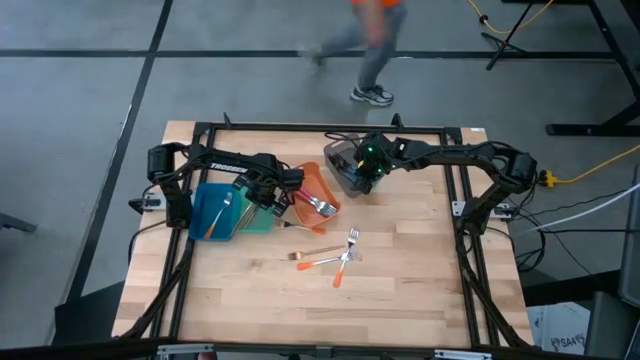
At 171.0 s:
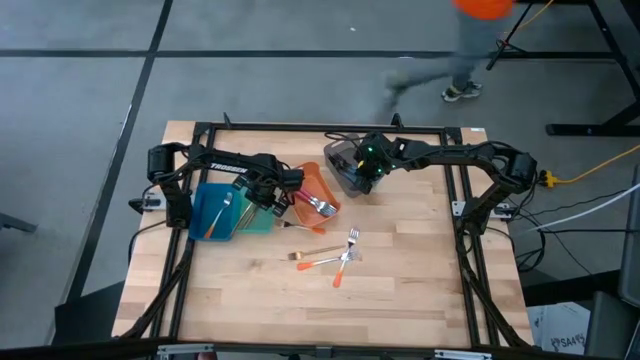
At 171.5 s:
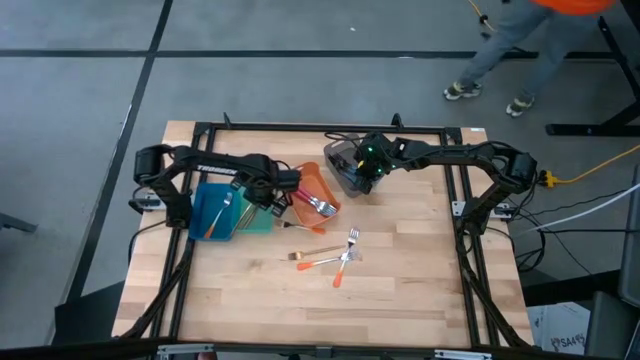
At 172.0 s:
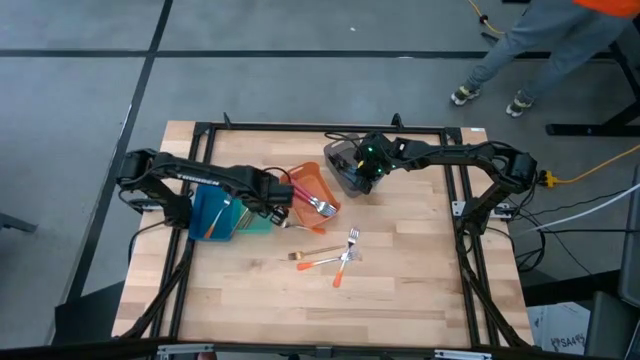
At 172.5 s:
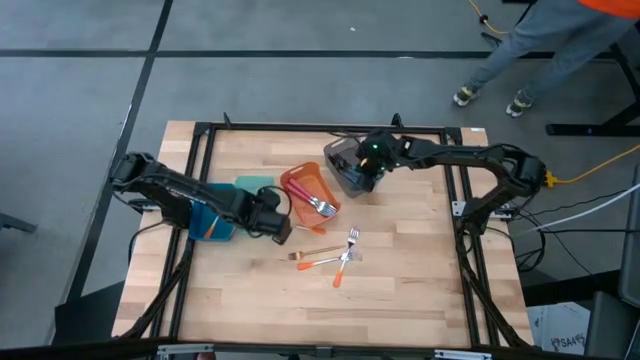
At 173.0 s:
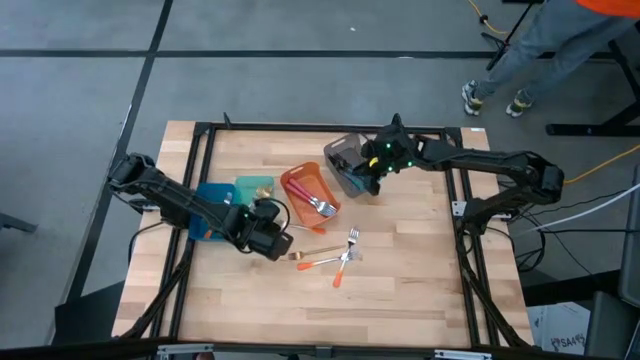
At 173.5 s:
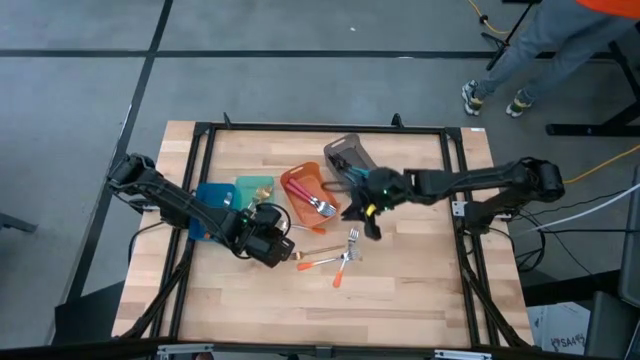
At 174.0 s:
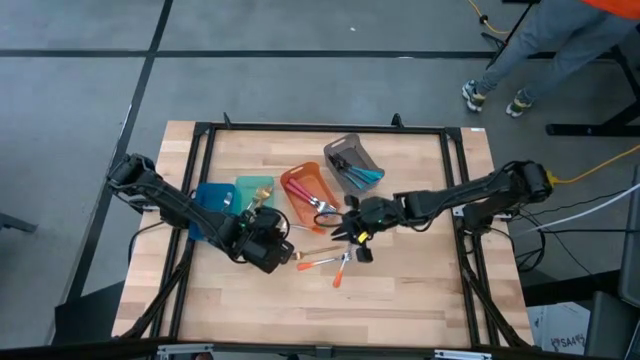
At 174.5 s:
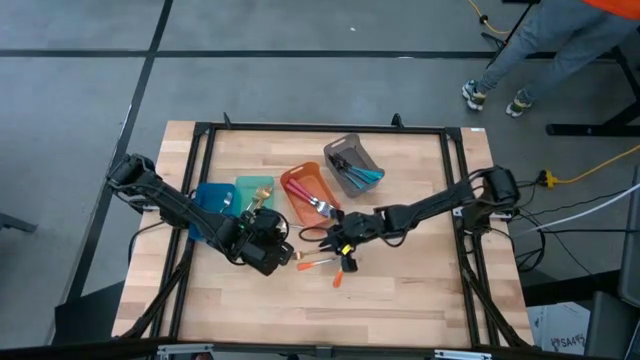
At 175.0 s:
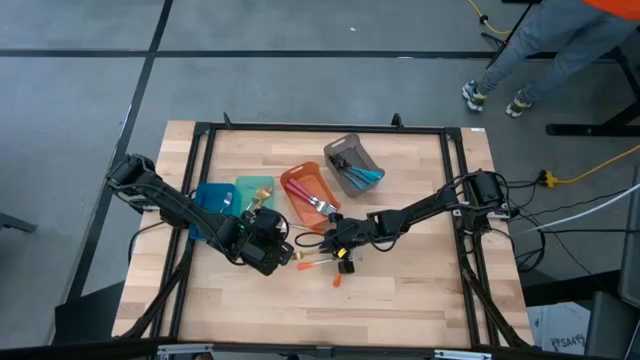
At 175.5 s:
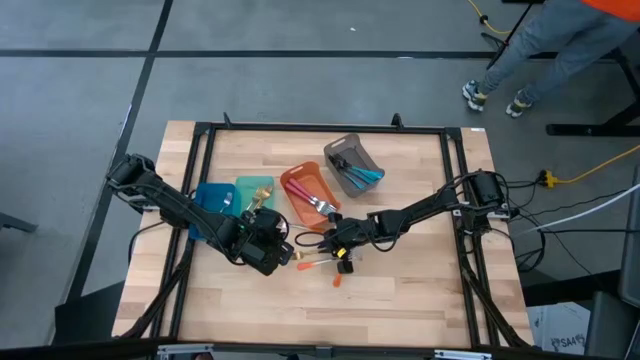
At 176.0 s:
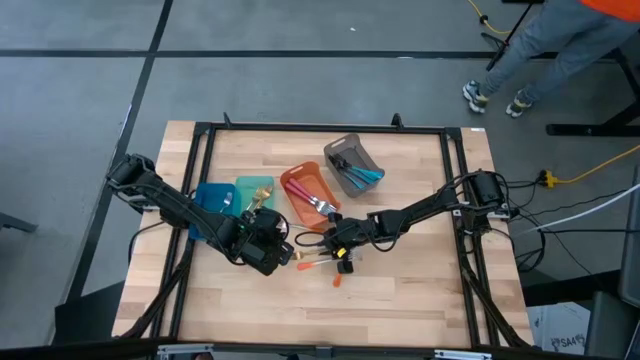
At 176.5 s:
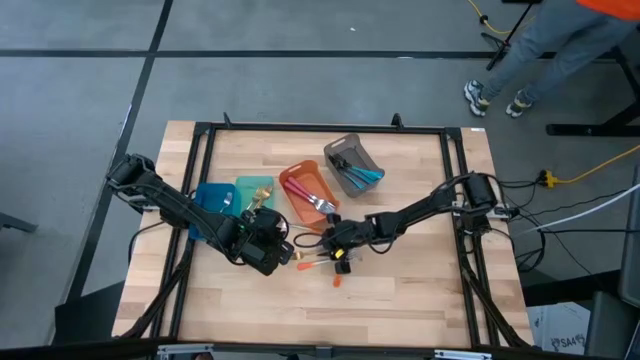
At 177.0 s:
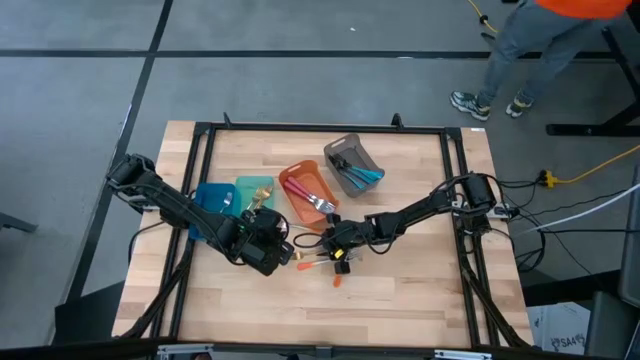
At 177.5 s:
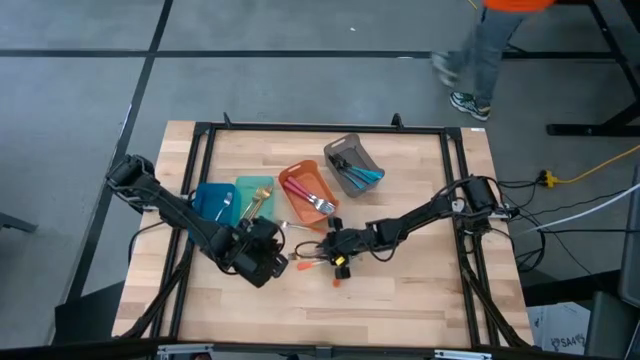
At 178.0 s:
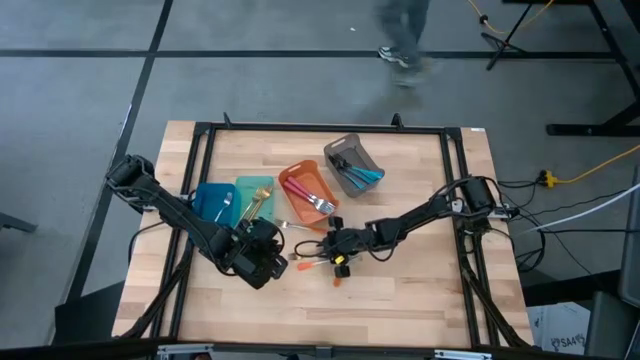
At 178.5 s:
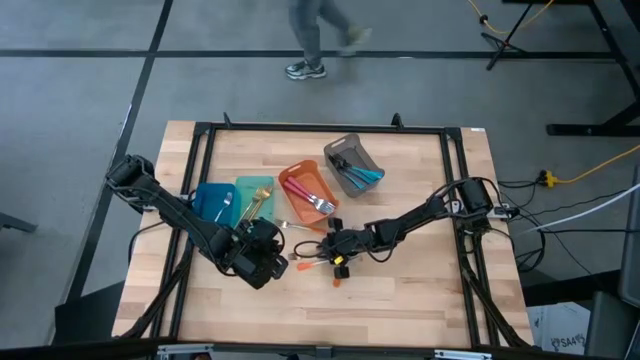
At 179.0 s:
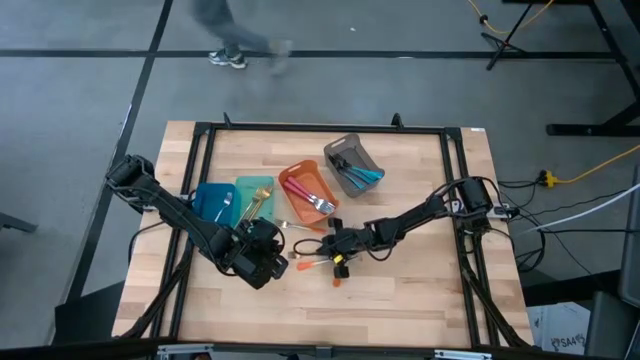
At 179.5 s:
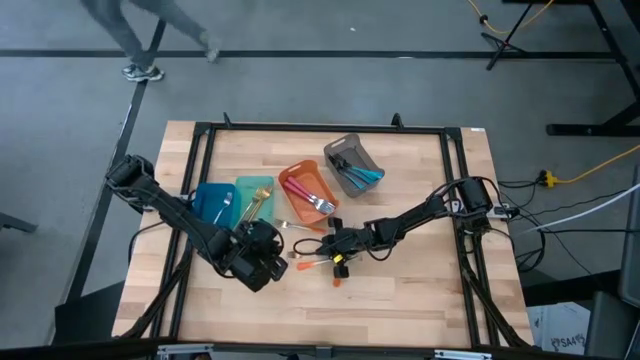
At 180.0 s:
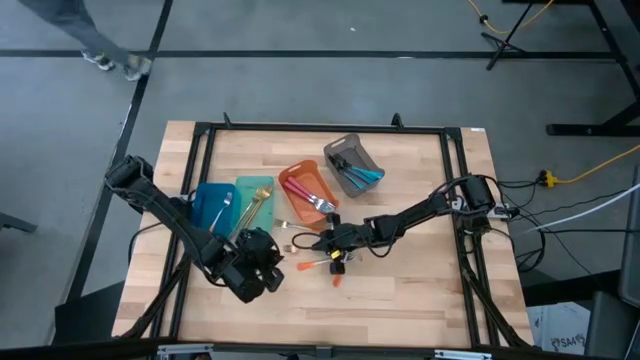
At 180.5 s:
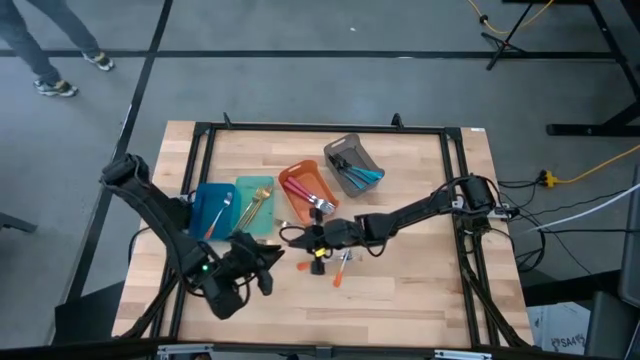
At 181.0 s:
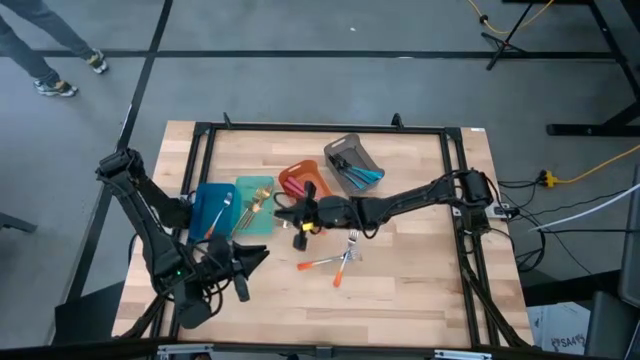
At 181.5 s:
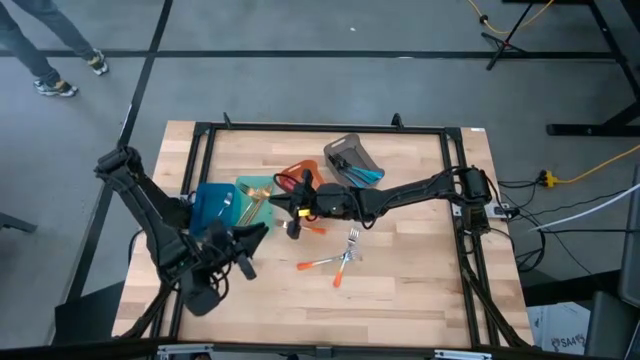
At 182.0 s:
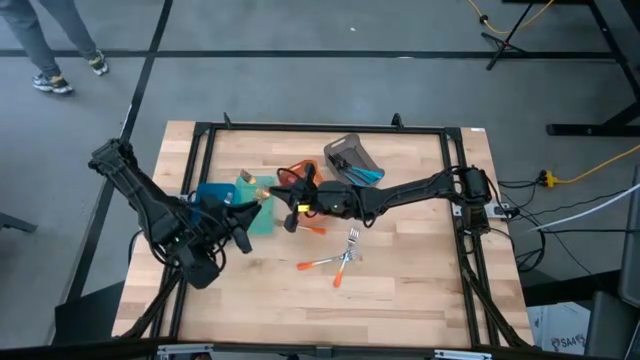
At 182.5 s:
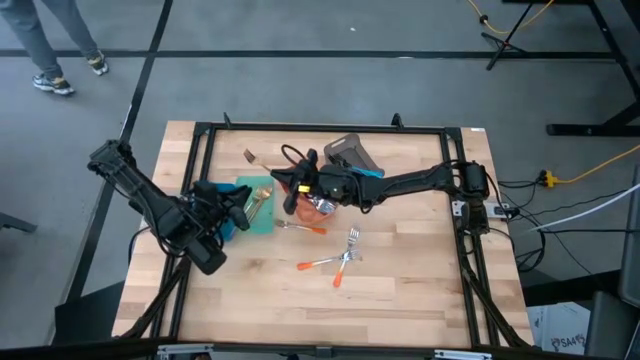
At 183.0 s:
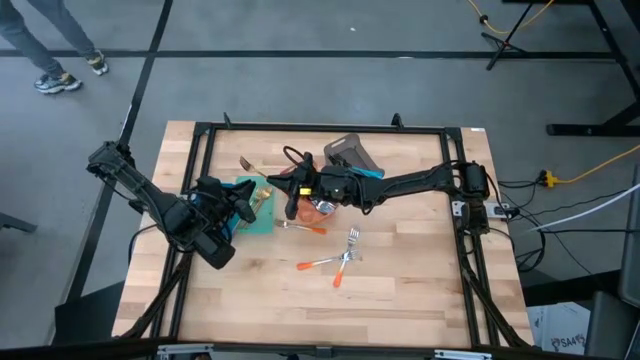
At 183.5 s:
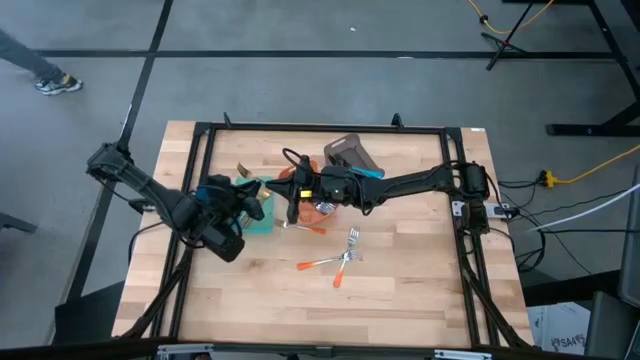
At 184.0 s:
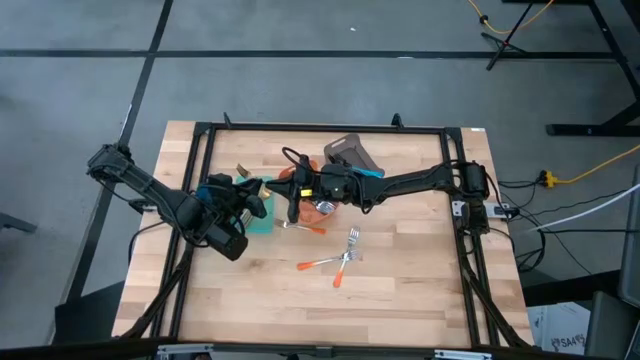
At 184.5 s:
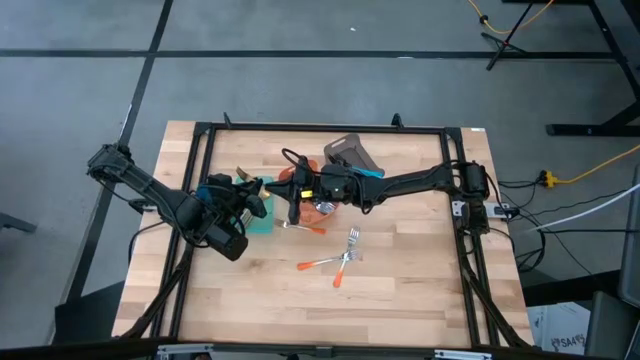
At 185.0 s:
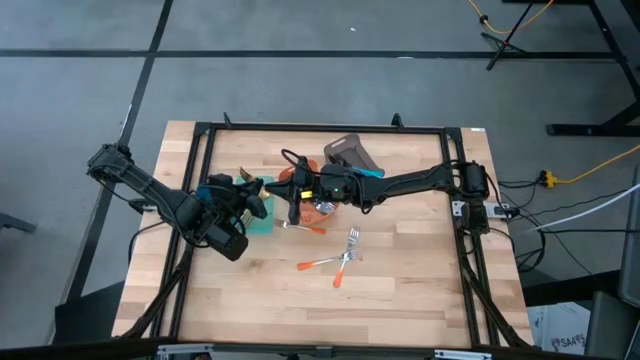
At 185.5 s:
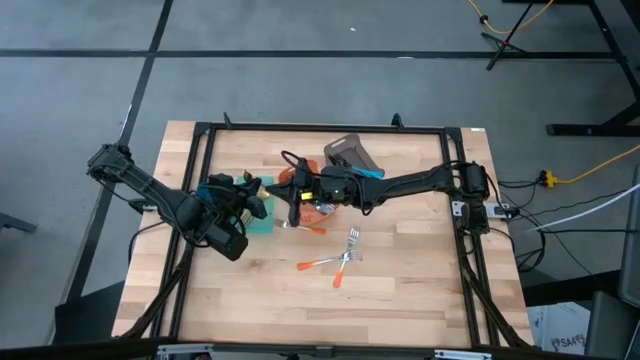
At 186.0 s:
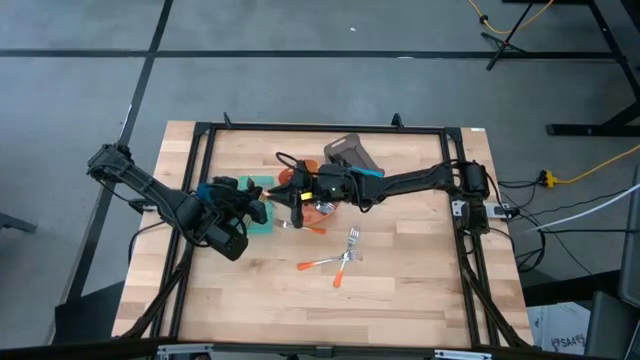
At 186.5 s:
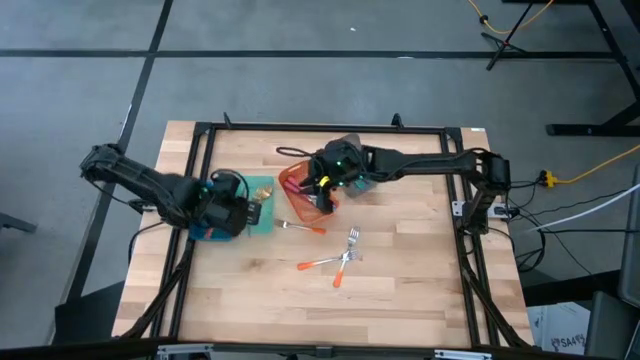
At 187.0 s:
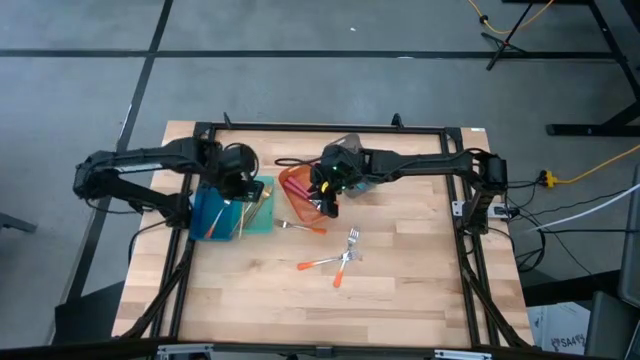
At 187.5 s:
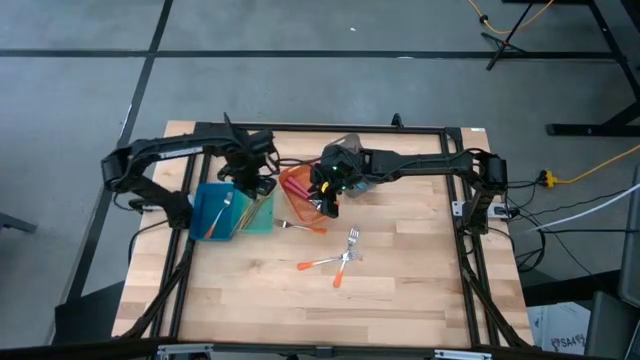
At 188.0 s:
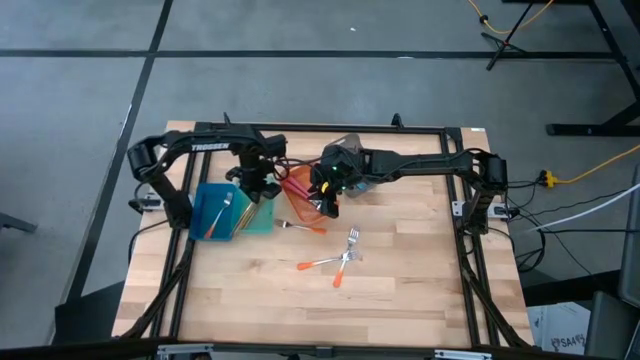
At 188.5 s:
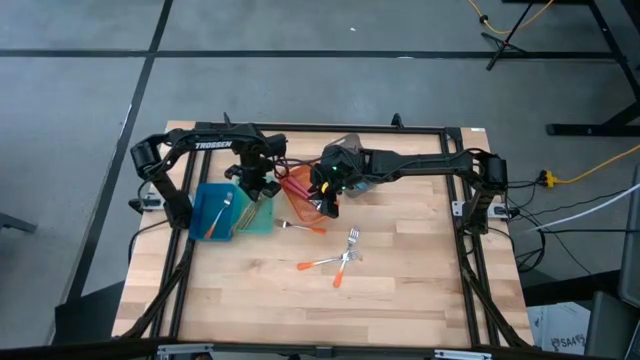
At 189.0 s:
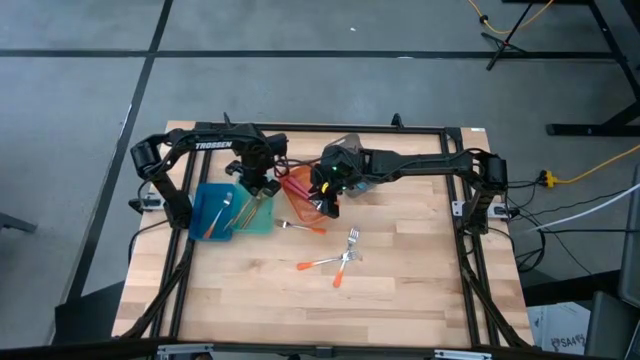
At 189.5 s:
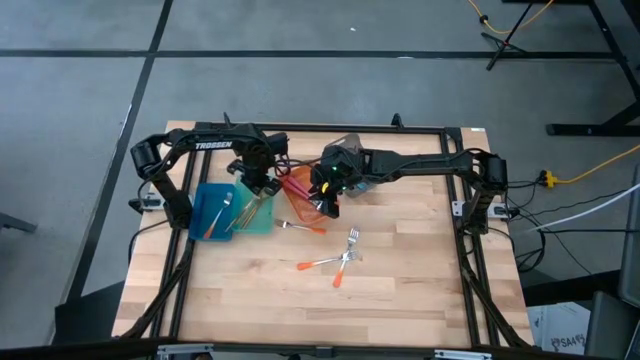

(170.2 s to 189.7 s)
Task: Sort silverware by color (type)
Put the gold fork into the light blue bin

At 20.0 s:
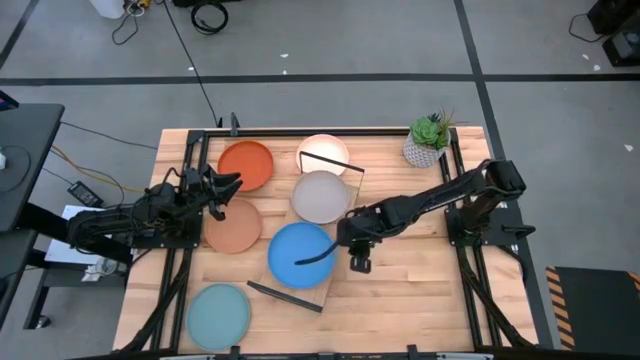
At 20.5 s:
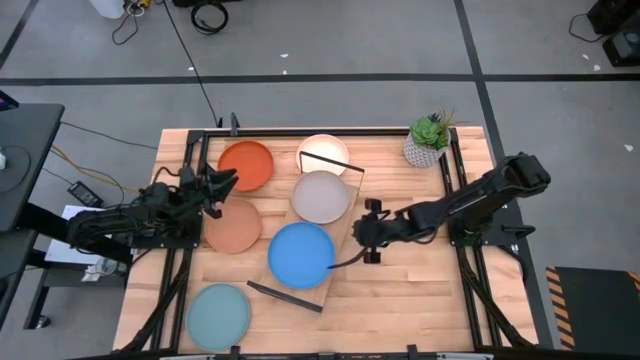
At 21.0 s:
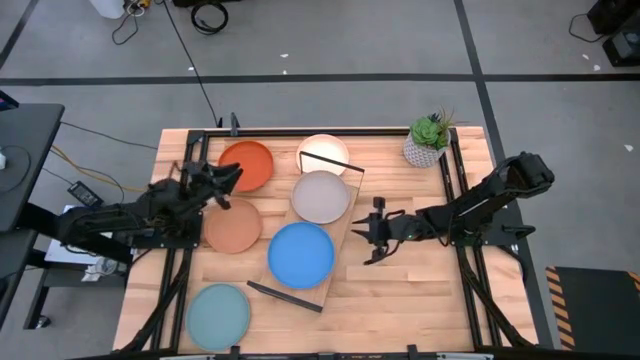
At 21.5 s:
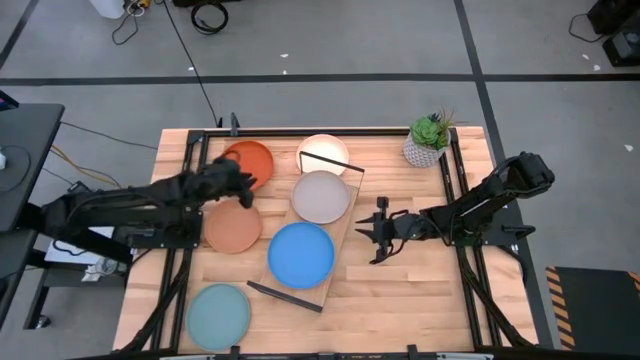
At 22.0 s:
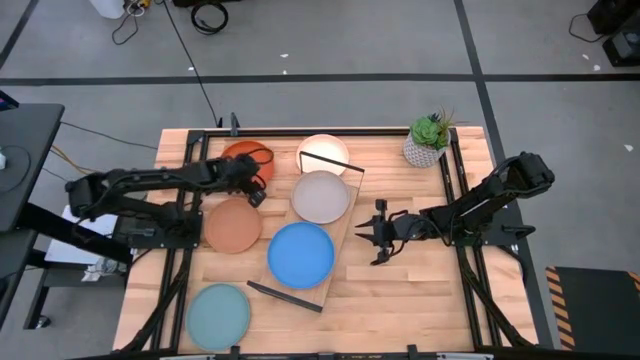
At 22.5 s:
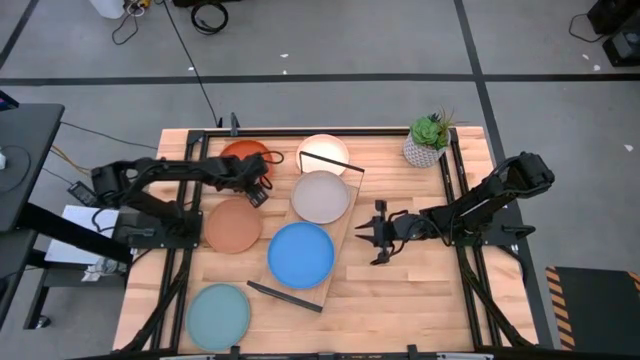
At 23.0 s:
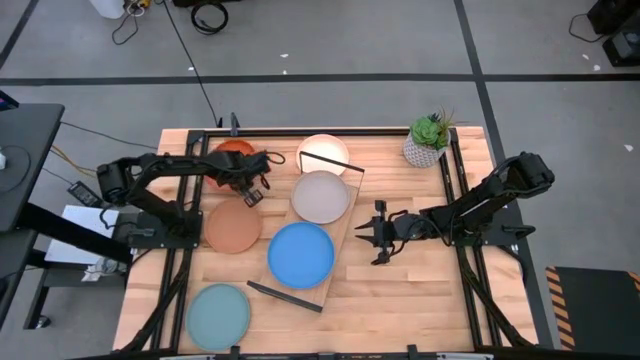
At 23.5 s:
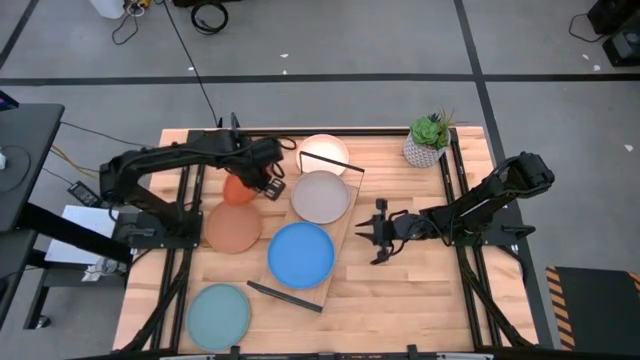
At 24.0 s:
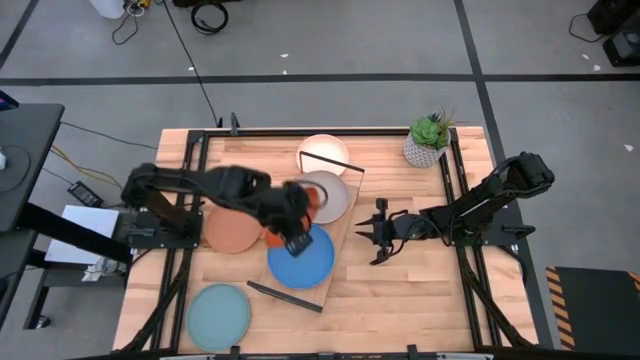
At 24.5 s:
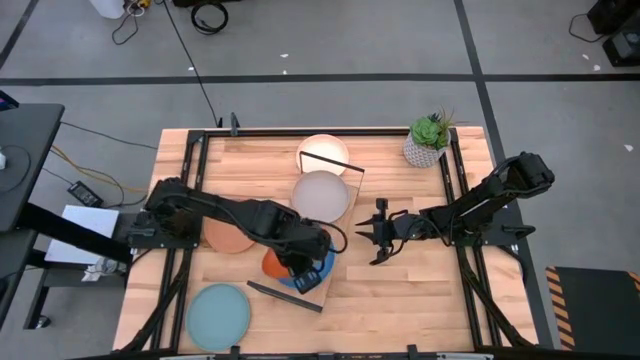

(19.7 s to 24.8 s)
Task: Place and stack plates onto a shelf
Stack the orange plate on top of the blue plate on the shelf
